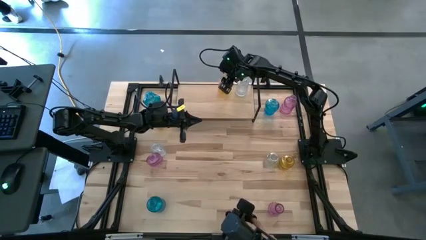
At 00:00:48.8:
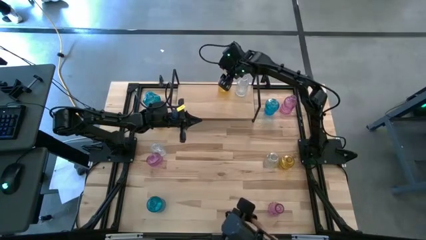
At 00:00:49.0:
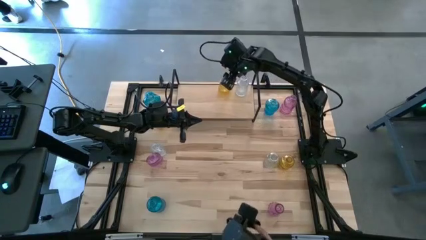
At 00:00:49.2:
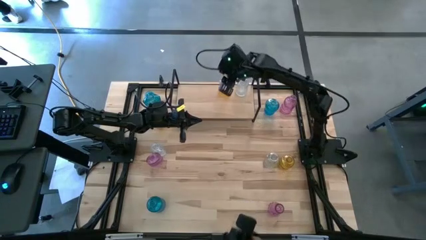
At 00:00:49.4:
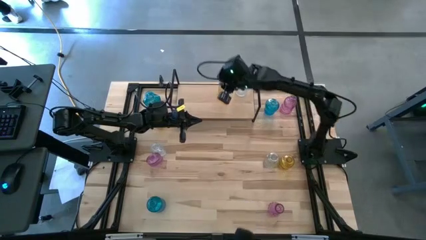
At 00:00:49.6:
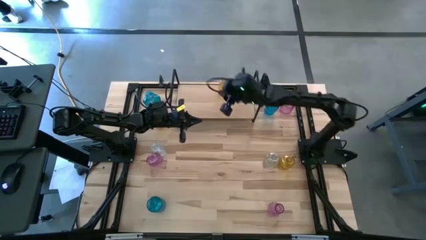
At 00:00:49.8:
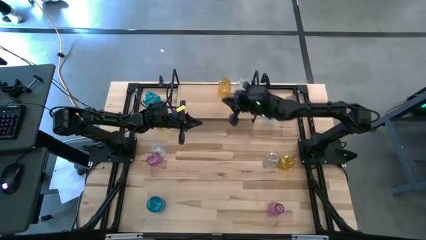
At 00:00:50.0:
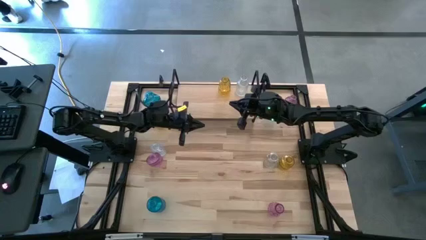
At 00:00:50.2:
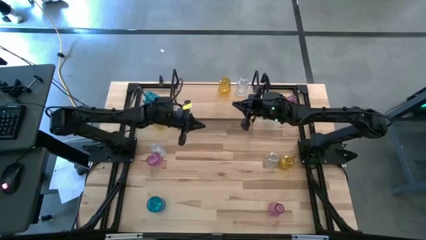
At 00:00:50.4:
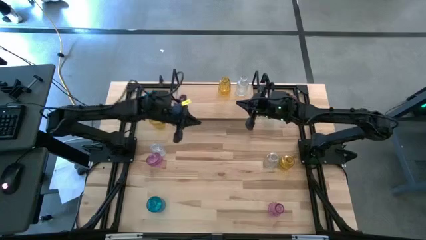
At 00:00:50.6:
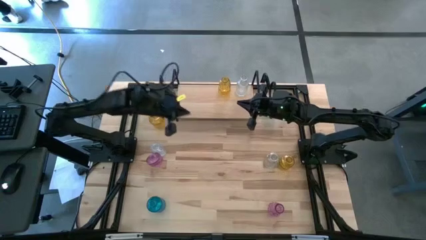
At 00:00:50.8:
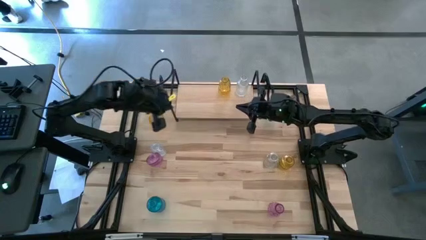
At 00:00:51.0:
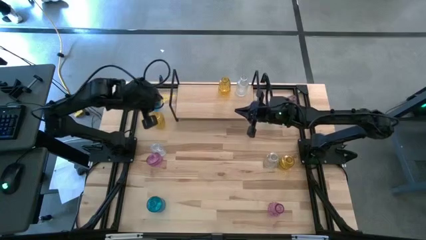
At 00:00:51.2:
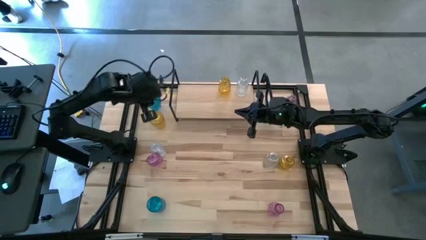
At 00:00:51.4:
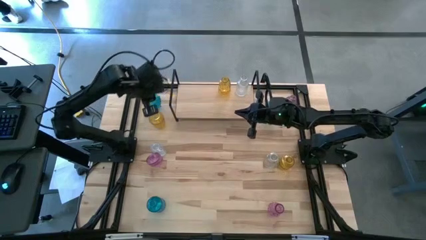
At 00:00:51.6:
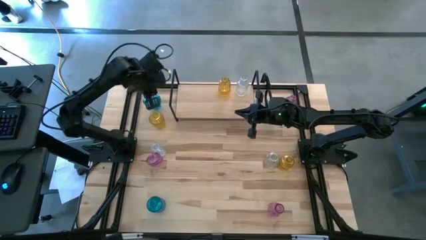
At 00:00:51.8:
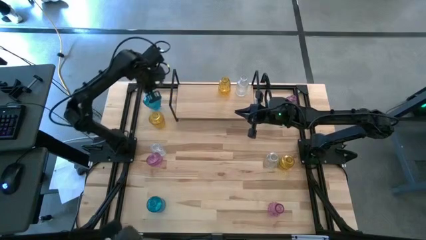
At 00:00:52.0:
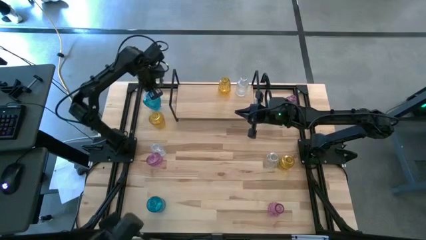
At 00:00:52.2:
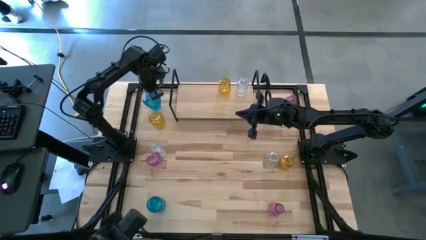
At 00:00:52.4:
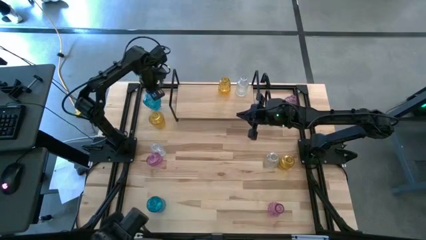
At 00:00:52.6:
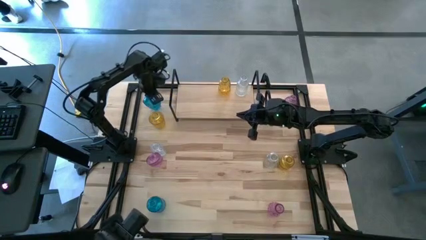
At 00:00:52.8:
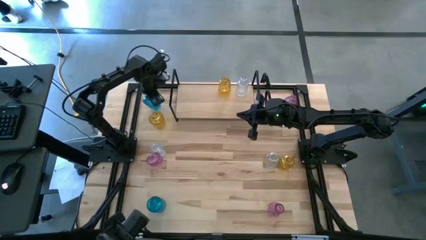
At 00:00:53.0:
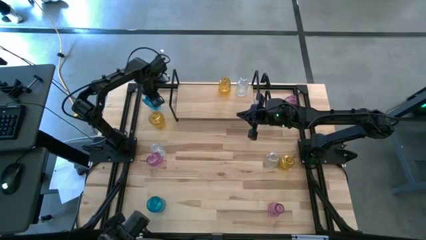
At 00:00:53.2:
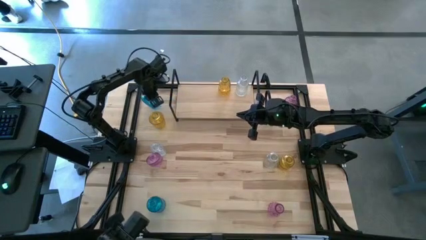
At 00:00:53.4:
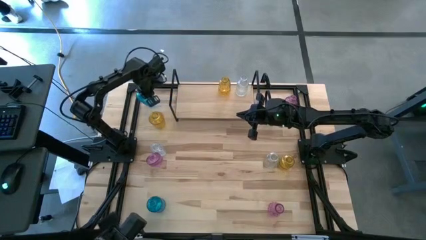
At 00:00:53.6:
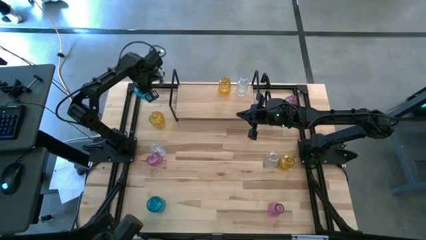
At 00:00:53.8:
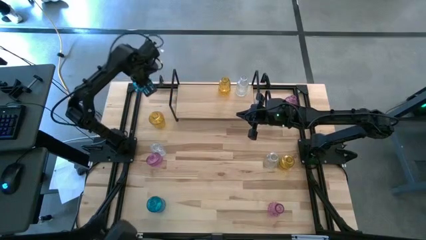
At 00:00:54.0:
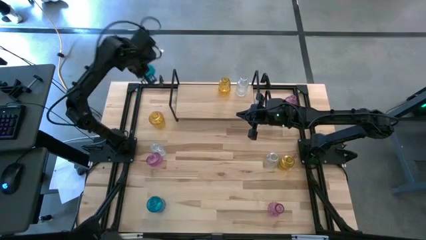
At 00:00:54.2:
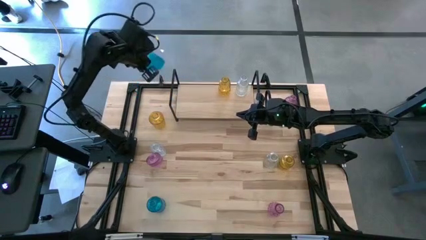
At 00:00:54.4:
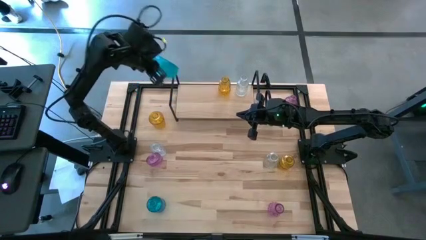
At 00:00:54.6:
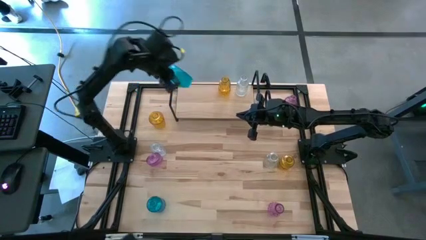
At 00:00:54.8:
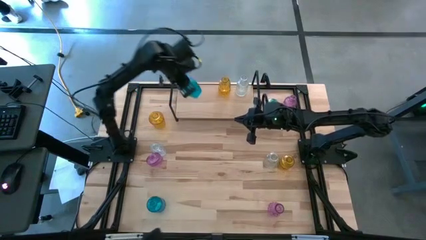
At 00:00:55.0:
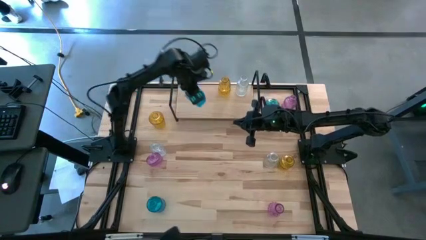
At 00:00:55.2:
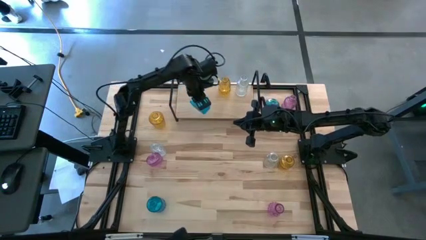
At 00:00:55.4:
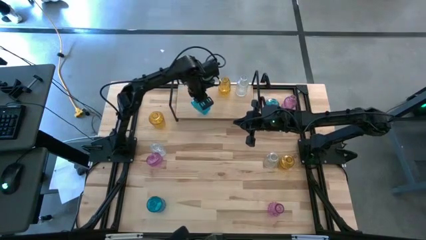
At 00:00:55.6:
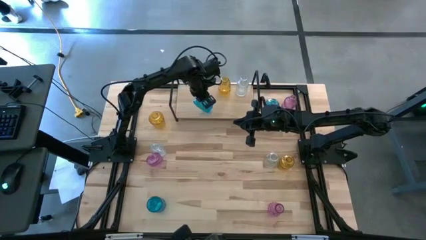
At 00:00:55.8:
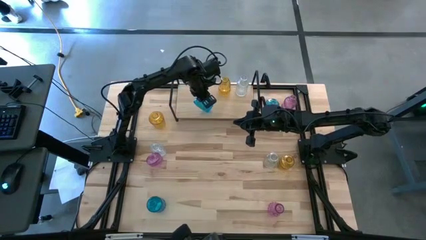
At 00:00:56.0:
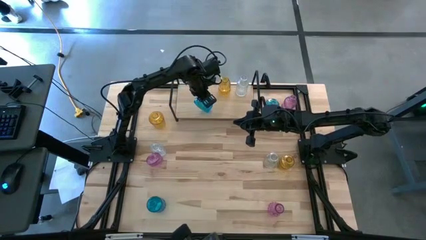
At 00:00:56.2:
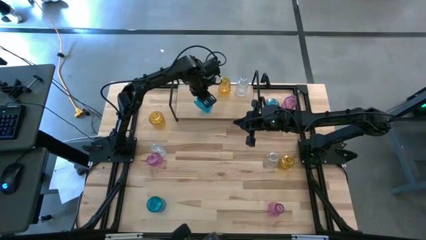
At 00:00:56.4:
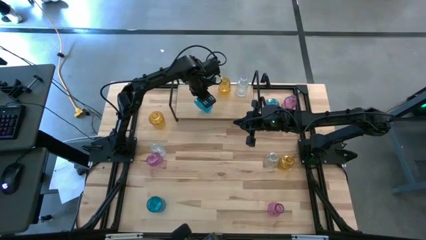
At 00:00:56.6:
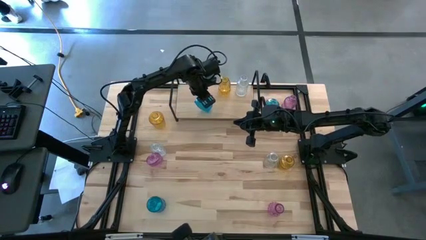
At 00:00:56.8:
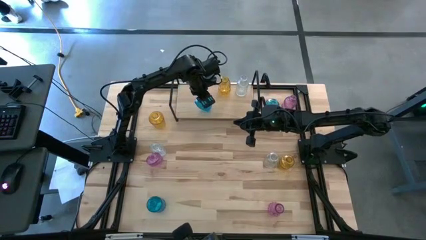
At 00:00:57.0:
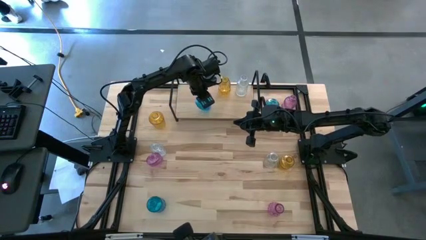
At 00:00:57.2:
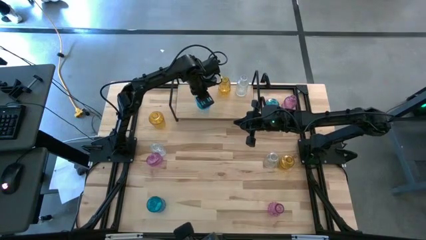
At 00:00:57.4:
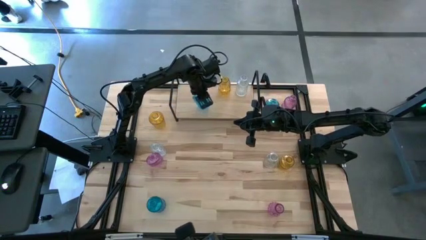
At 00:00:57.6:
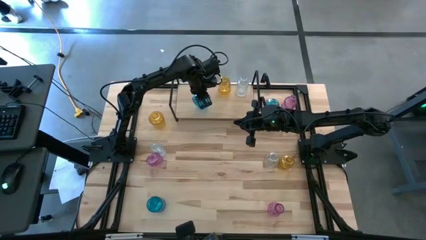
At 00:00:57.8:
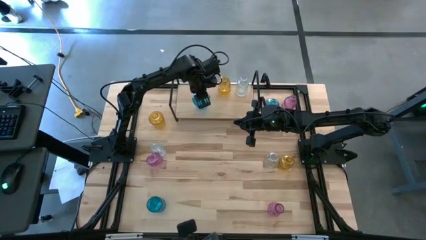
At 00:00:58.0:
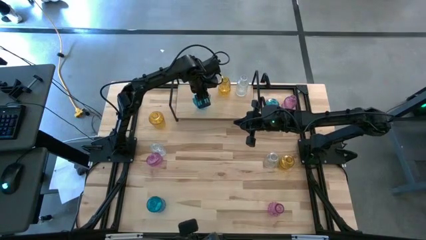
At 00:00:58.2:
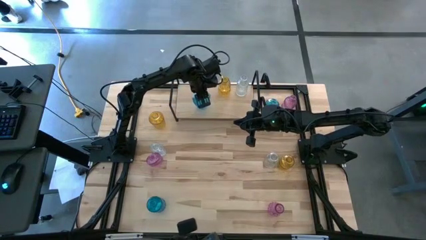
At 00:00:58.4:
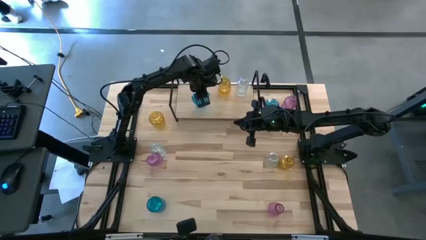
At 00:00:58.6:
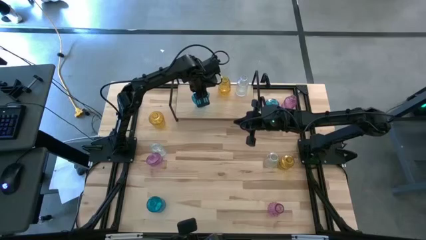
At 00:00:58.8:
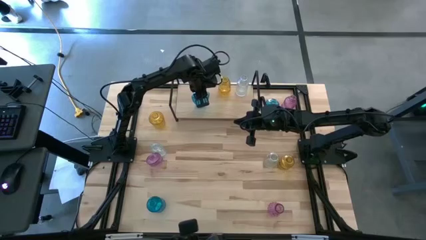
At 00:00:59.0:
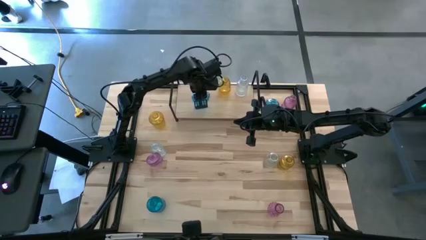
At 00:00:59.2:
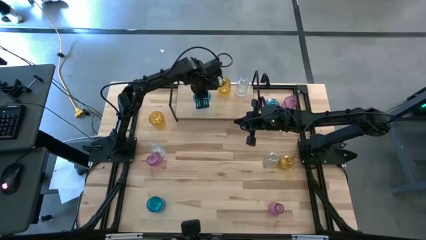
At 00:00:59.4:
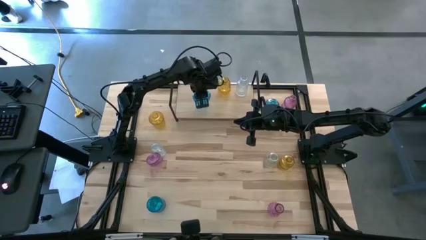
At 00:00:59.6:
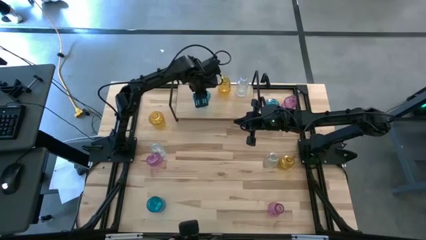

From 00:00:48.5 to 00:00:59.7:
Task: sort vases onto shelf
Put the top left blue vase on the shelf

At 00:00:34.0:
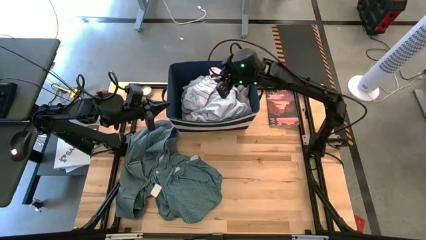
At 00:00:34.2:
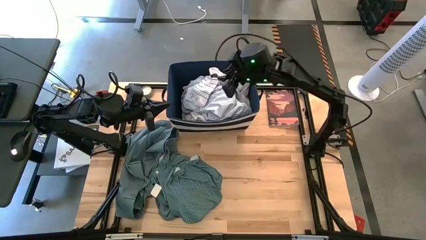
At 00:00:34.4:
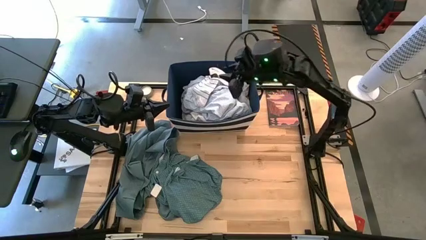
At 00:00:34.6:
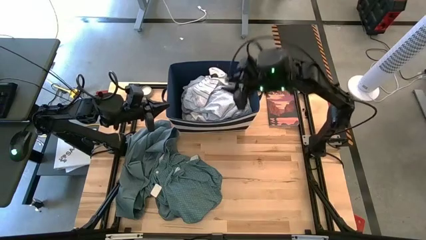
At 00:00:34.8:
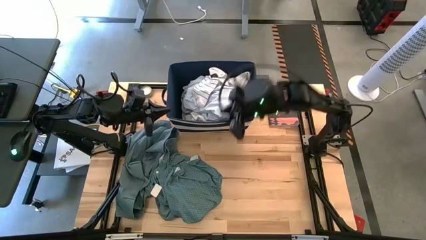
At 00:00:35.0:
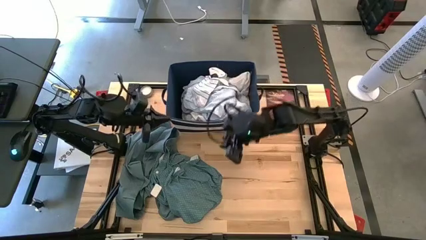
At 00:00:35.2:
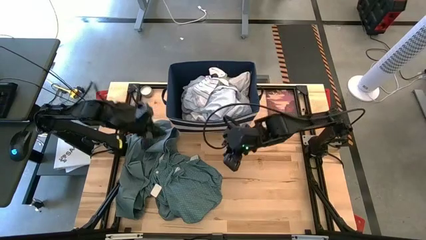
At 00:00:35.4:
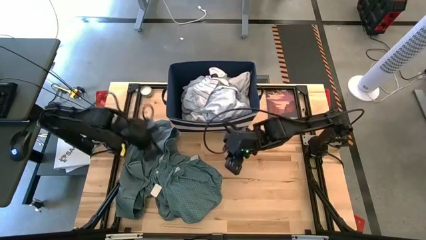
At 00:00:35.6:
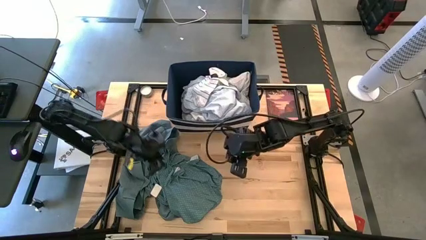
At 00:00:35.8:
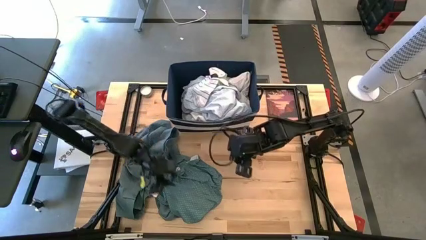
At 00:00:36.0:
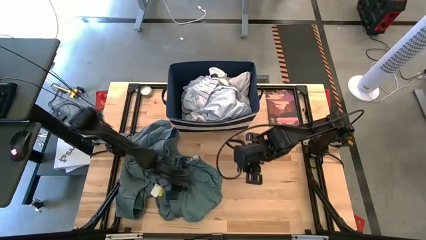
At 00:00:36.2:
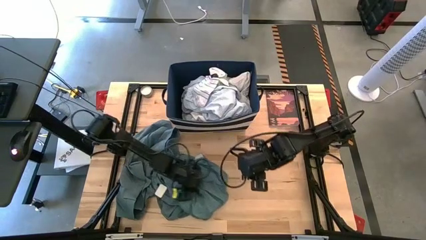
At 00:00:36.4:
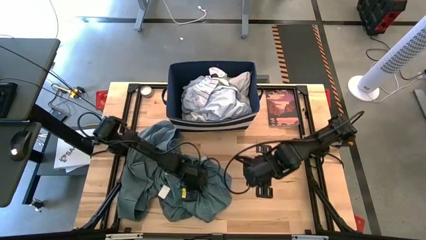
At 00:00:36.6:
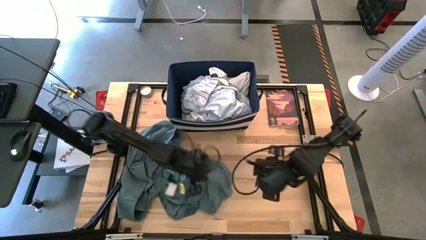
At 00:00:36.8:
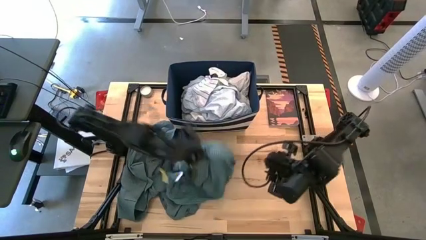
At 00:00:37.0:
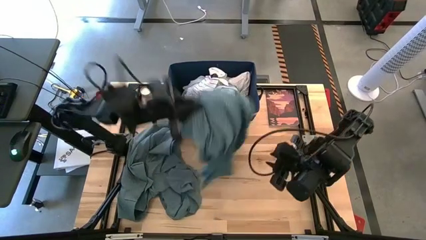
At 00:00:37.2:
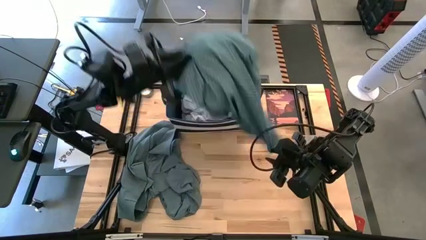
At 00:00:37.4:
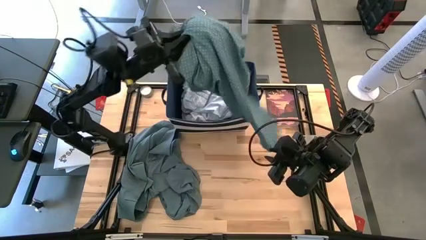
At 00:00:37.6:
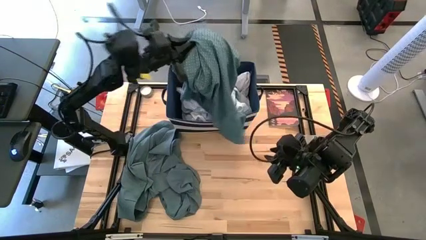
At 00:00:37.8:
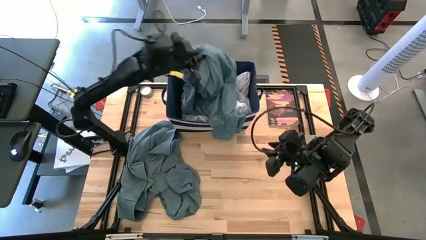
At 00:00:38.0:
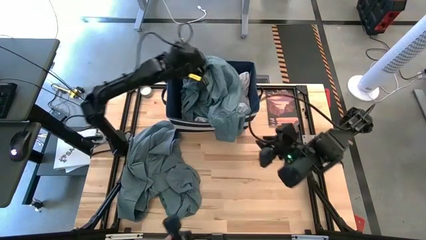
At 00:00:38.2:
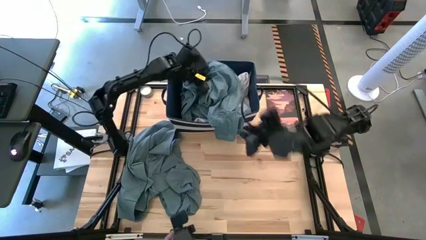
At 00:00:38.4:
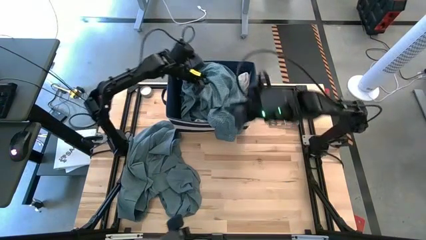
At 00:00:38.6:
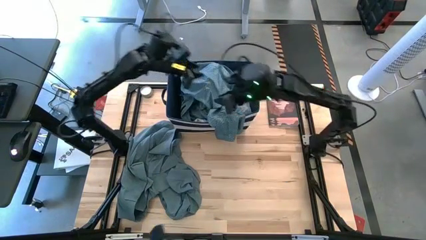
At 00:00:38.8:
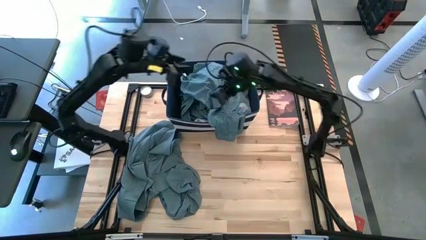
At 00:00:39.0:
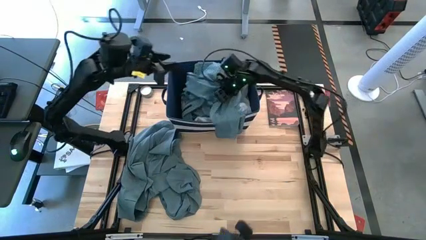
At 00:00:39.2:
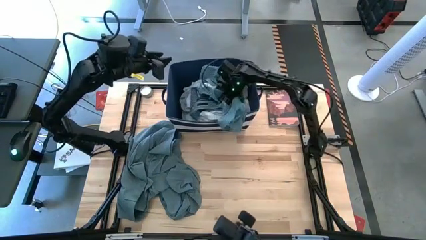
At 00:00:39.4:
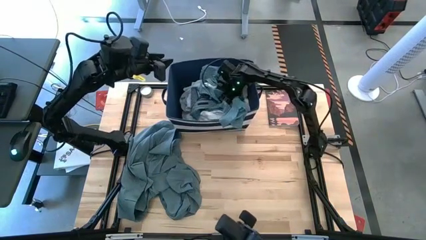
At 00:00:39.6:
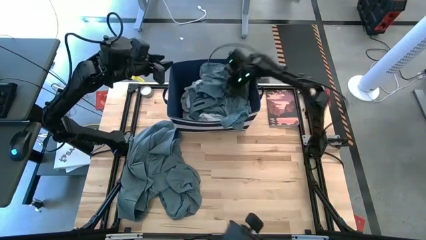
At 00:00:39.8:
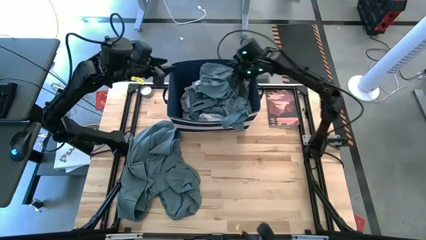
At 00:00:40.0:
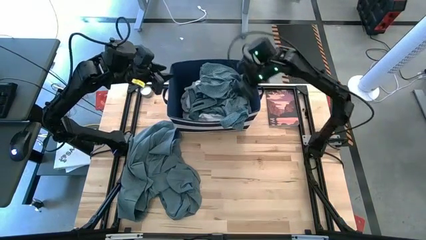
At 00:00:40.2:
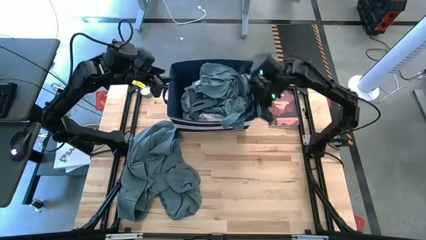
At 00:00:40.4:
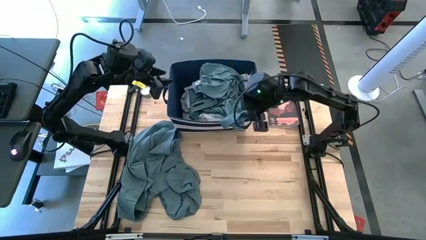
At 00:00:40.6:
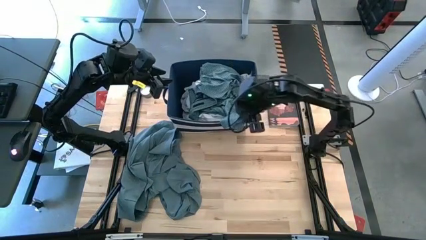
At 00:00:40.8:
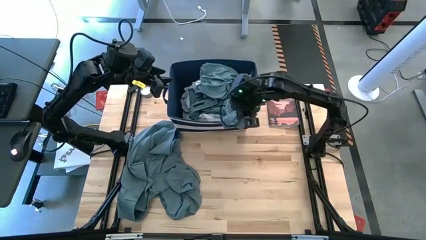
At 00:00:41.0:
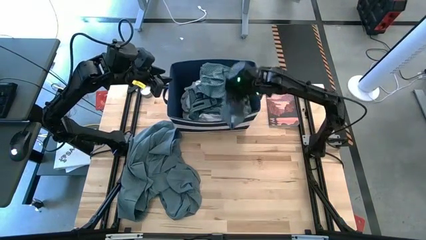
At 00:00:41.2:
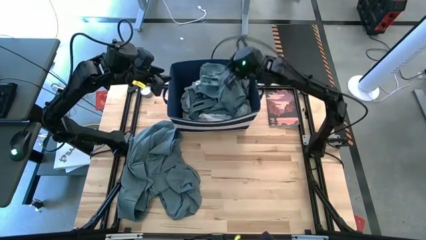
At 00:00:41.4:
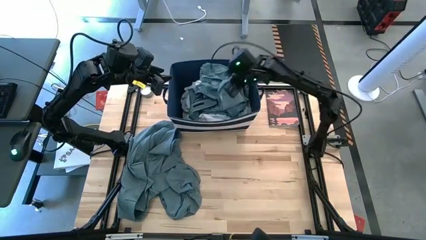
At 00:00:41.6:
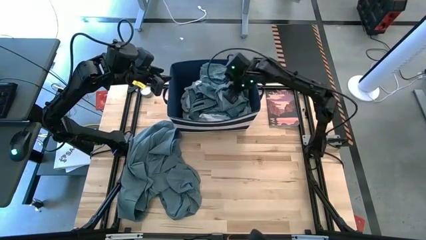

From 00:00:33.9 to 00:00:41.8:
Task: Sort clothes
Put the green polo shirt into the blue bin
